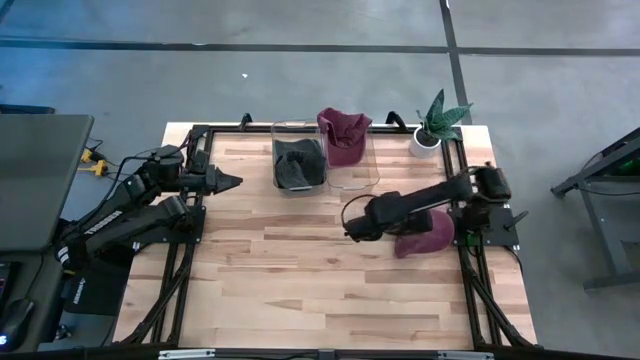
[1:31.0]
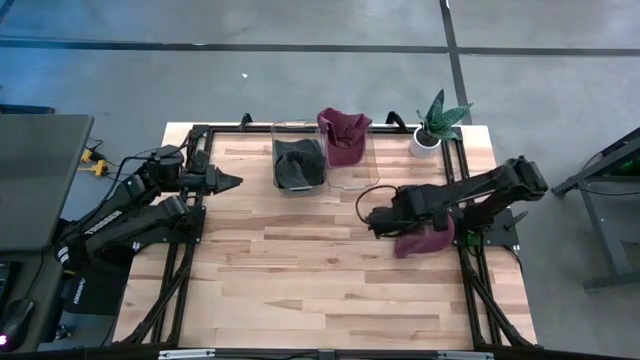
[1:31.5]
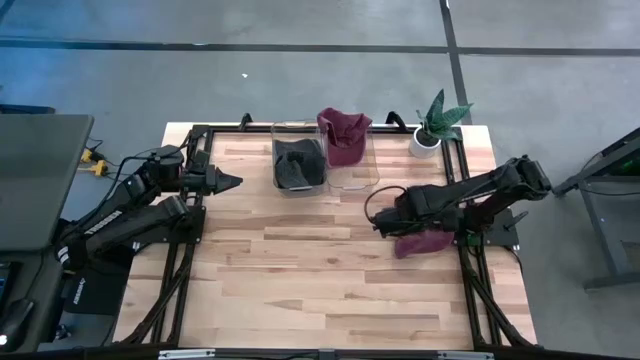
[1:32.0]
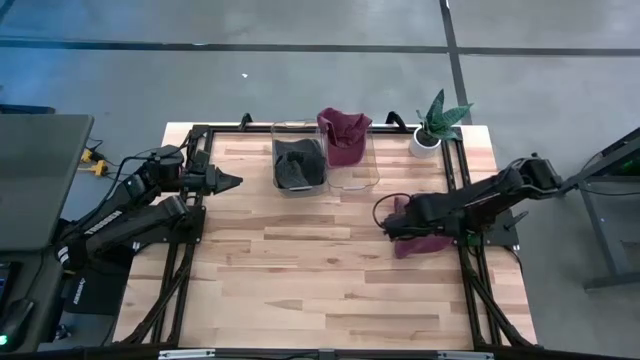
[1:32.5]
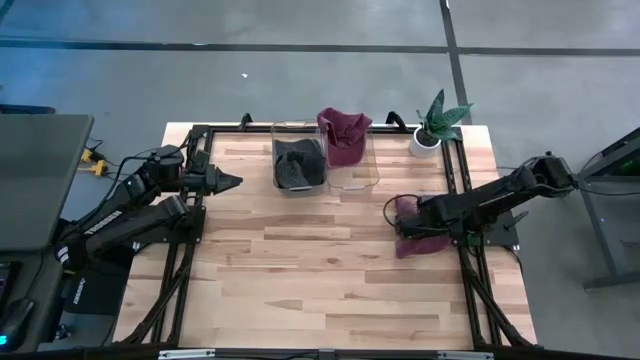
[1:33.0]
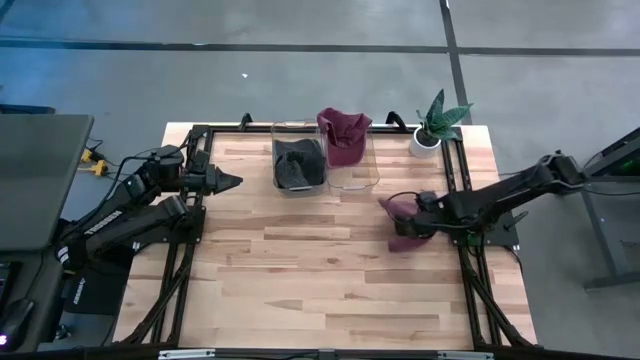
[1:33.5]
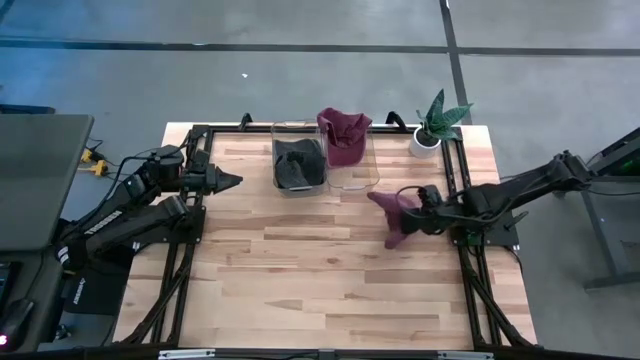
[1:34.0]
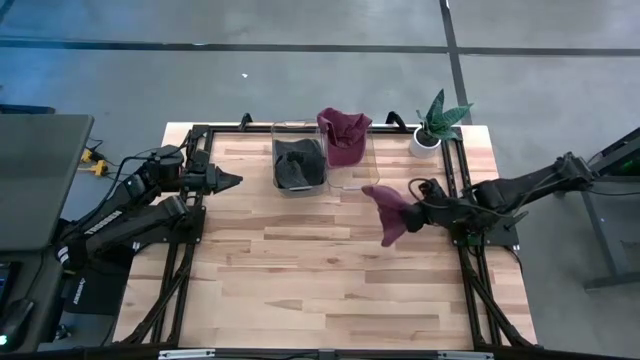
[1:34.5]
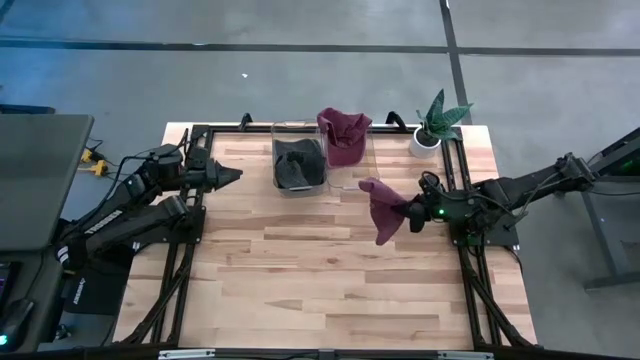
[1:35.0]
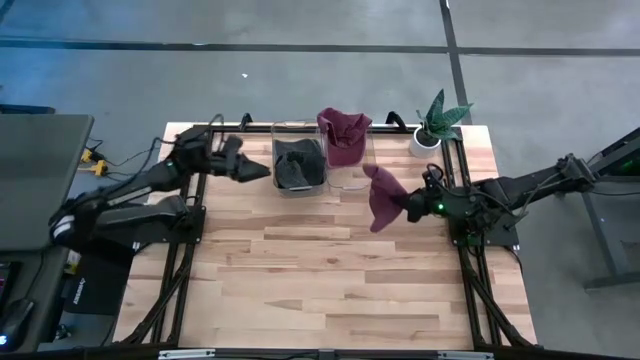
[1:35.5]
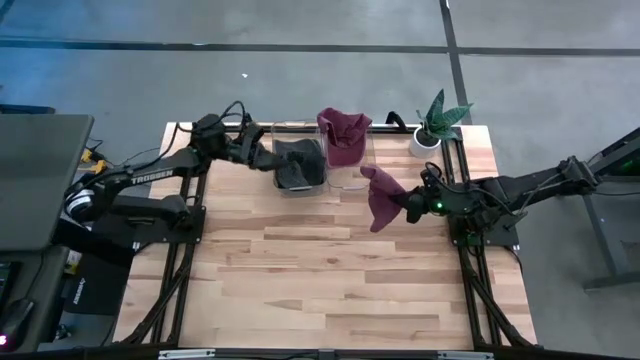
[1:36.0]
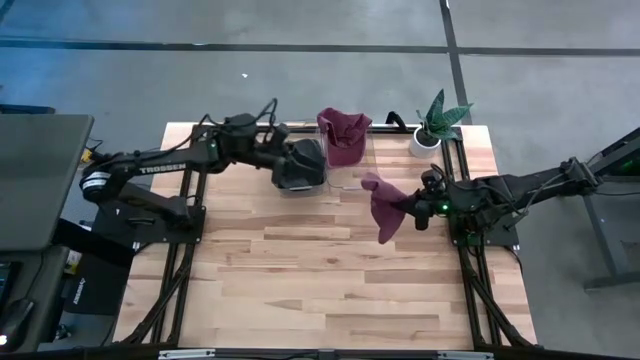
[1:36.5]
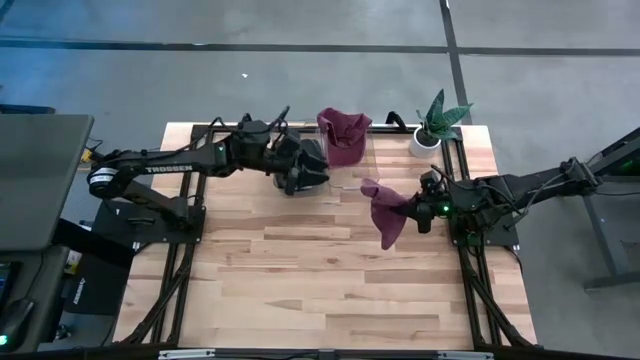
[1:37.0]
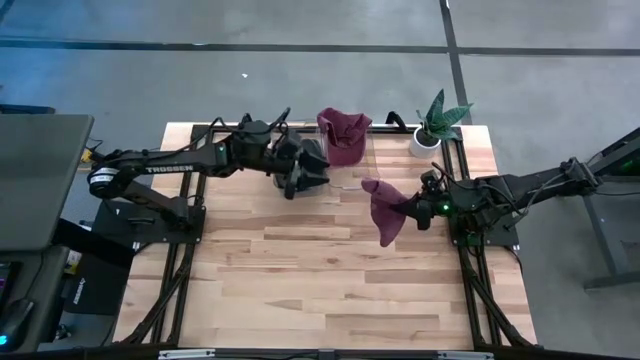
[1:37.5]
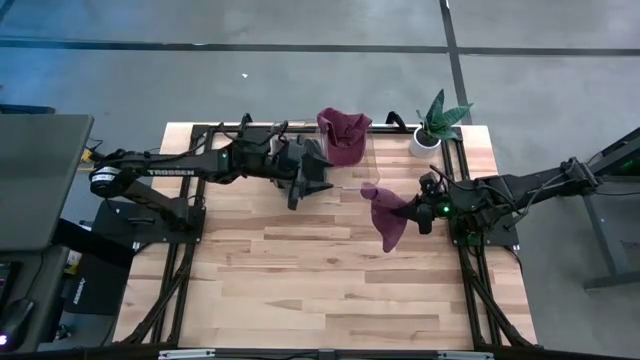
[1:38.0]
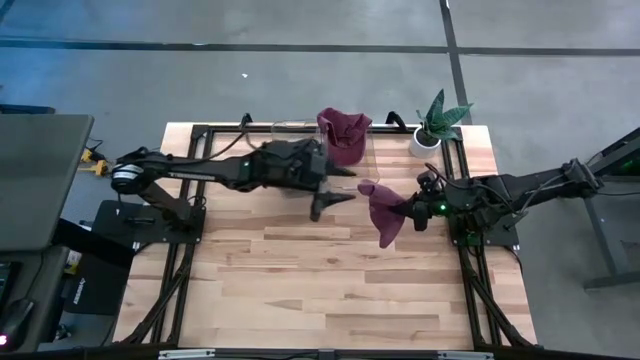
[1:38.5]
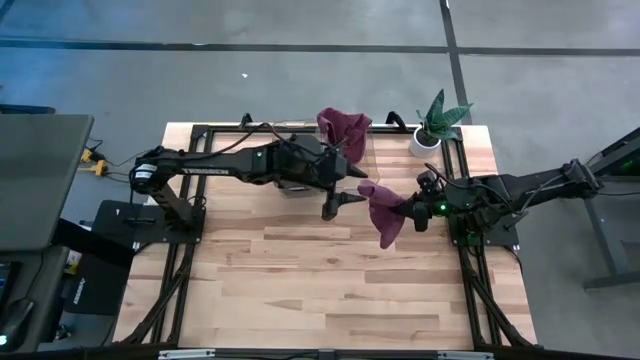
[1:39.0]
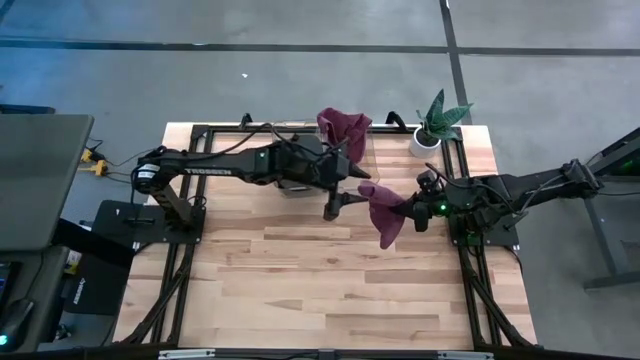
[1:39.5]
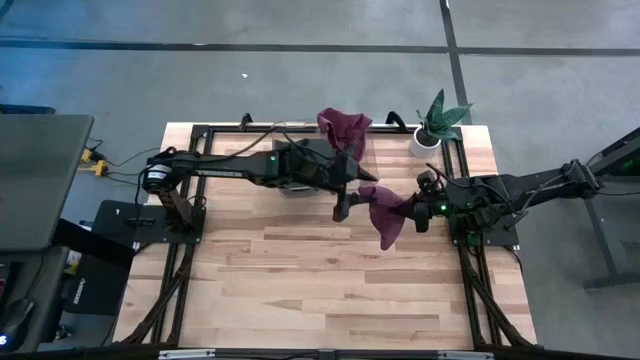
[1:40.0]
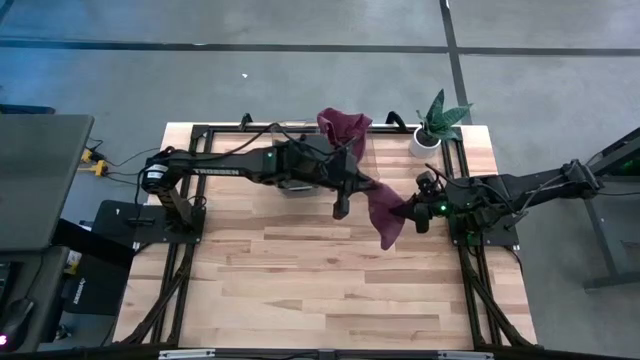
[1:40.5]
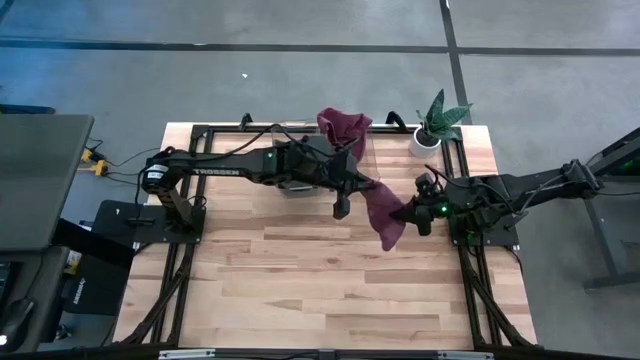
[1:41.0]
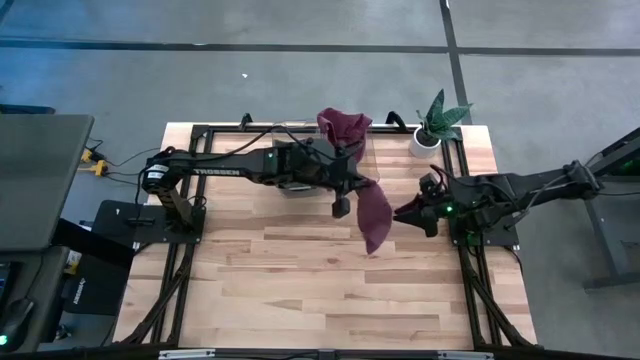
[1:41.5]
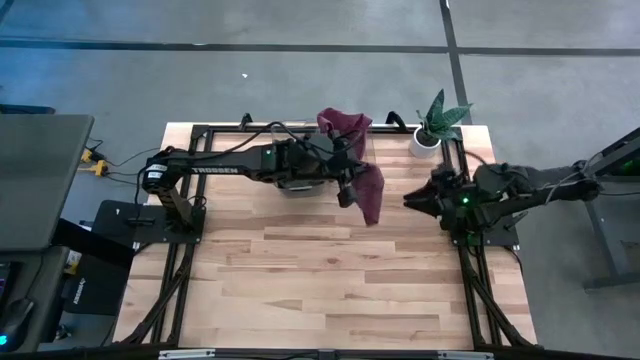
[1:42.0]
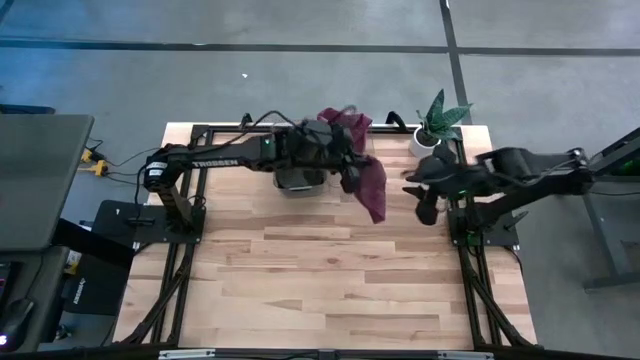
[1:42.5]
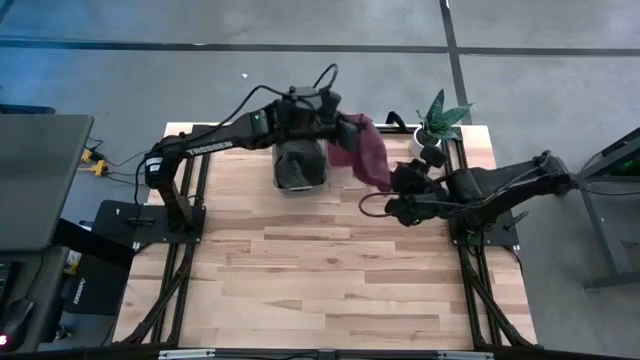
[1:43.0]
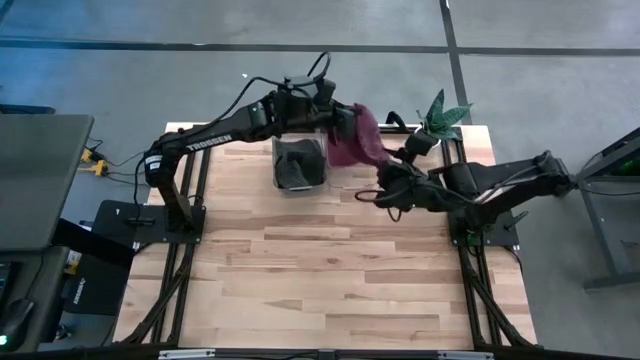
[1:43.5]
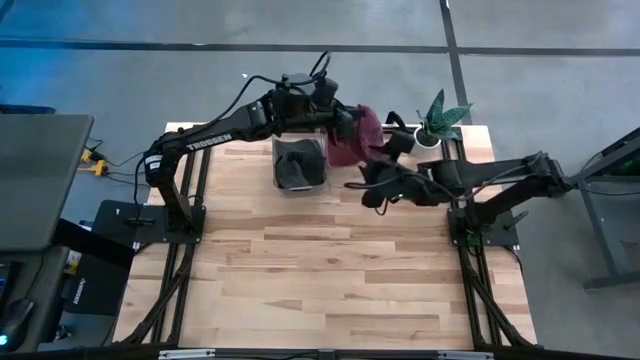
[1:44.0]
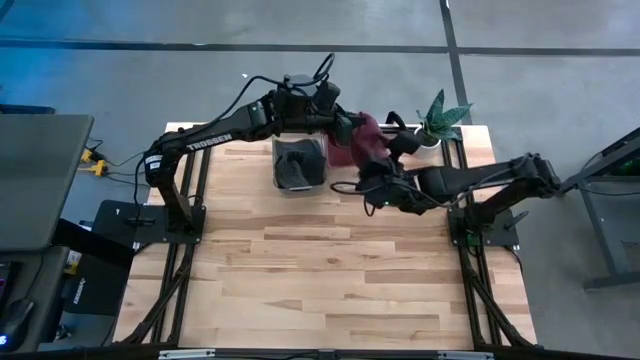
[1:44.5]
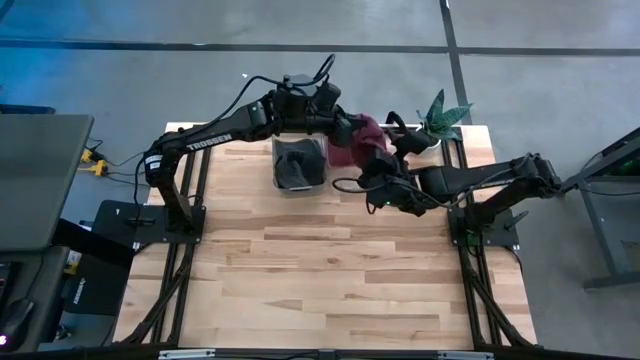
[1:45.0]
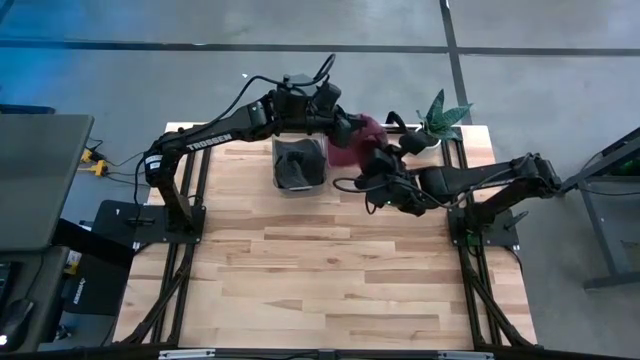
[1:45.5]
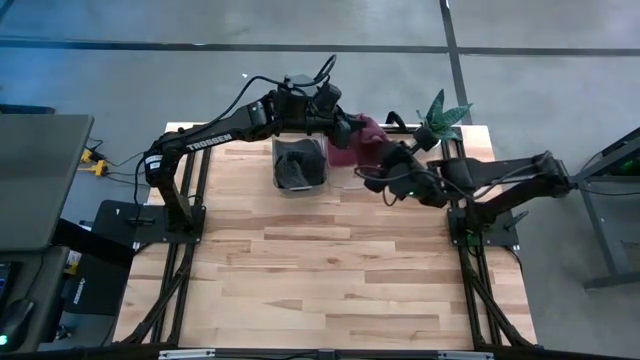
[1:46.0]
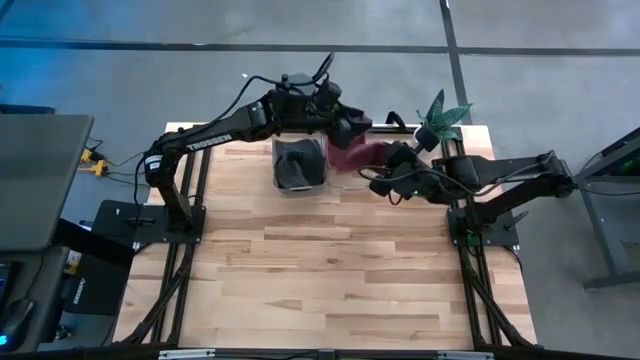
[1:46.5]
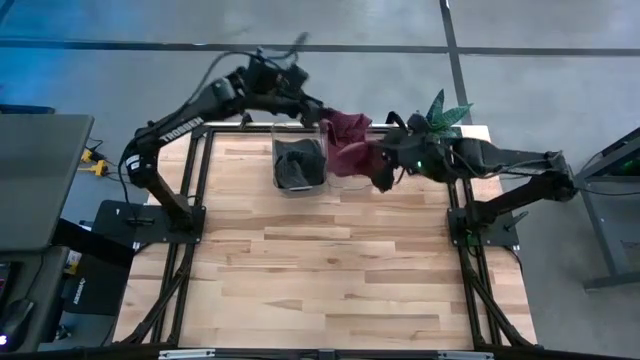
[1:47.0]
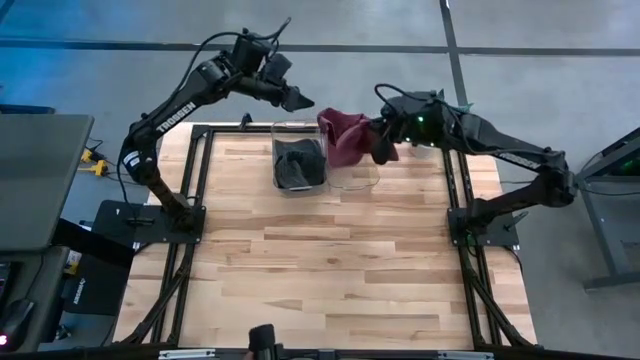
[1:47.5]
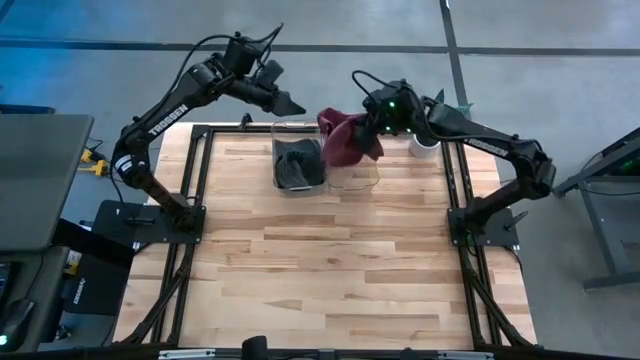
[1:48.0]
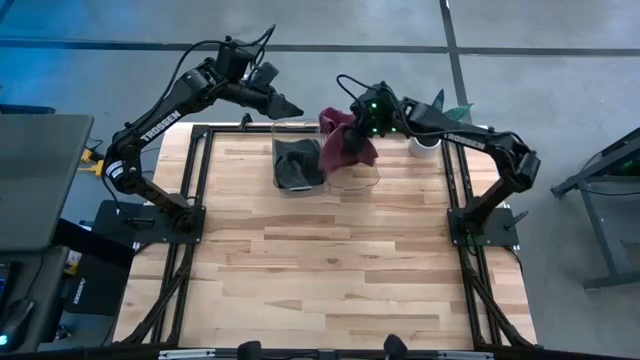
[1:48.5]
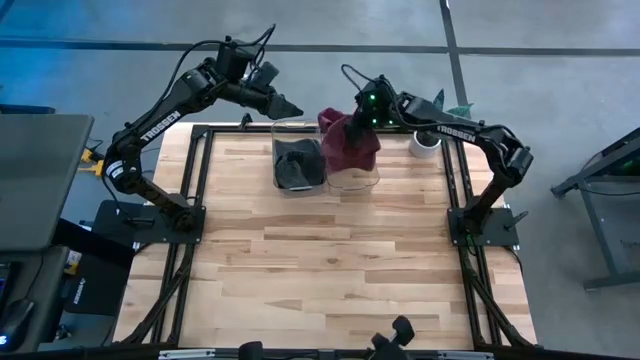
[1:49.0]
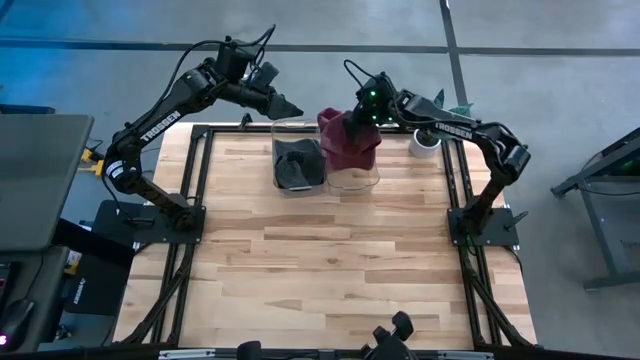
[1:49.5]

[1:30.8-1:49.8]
Task: Pick & Place hat
Put the red cap into the right transparent bin

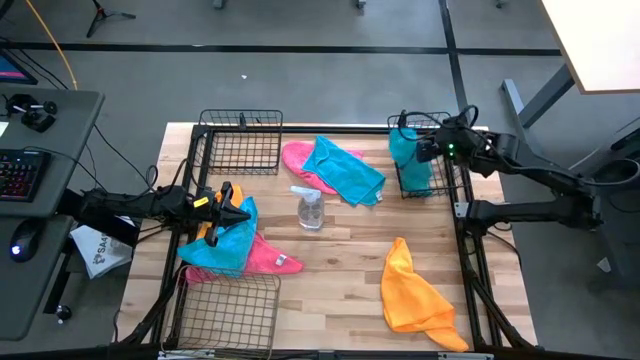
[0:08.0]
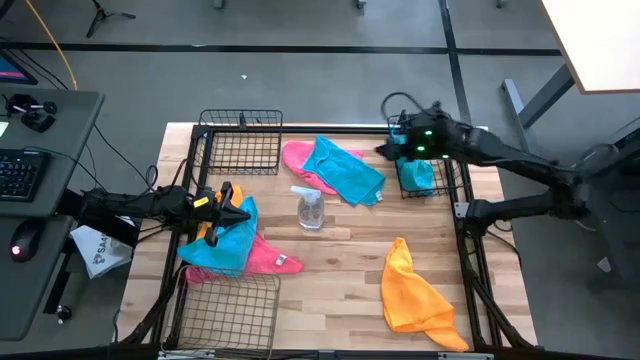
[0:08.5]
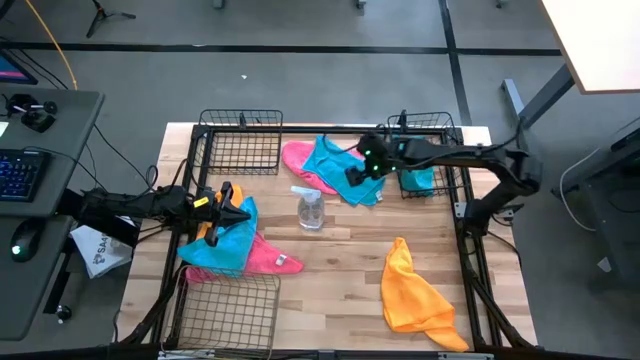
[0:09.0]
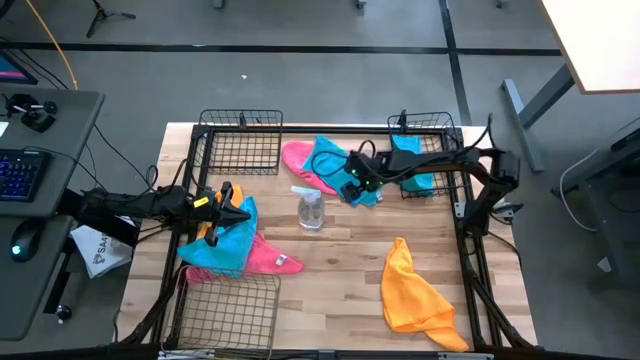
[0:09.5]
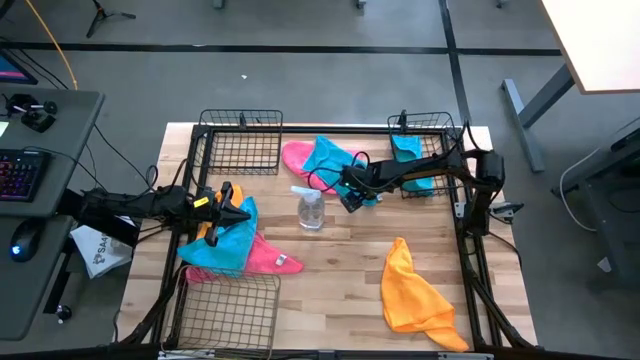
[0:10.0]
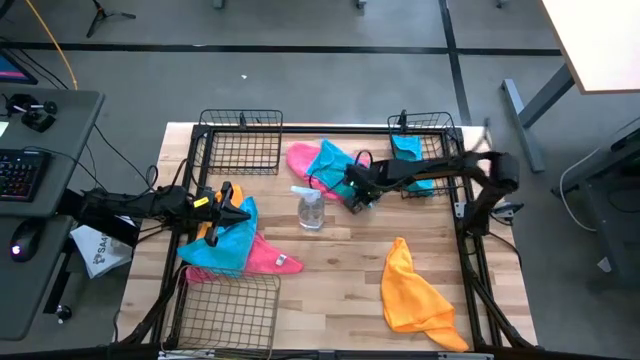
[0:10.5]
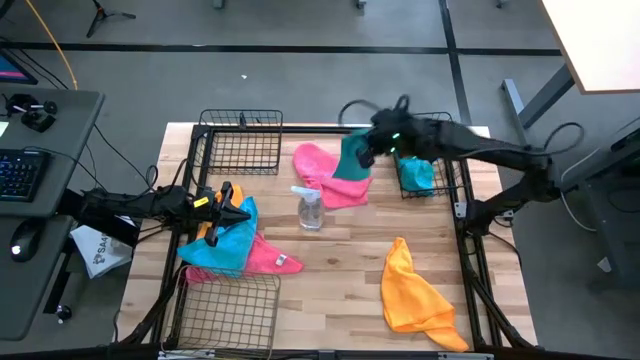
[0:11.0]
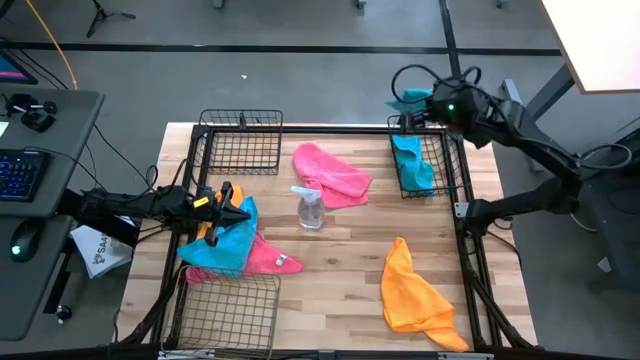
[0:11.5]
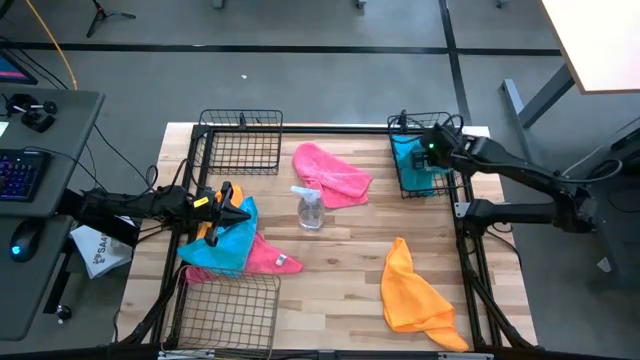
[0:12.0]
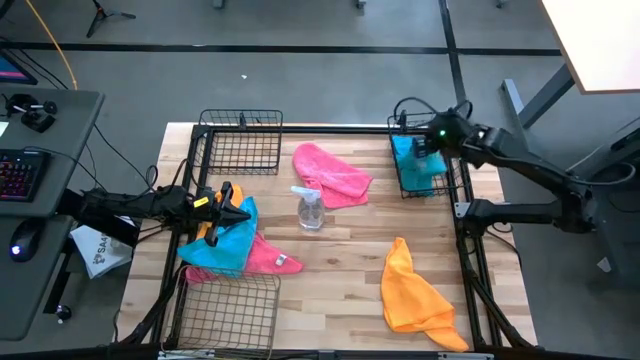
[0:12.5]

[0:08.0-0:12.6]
Task: Sort microfiber towel by color & place in baskets
Put the top blue microfiber towel into the right black wire basket
